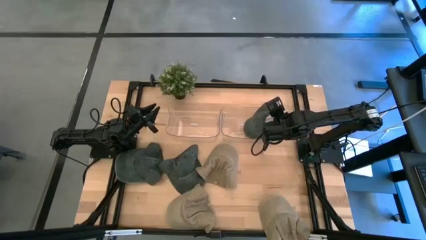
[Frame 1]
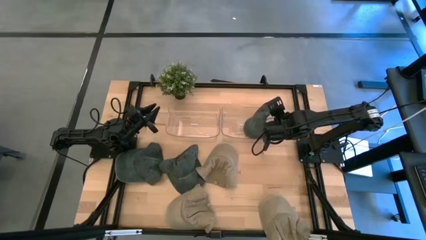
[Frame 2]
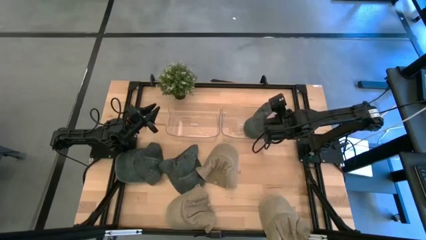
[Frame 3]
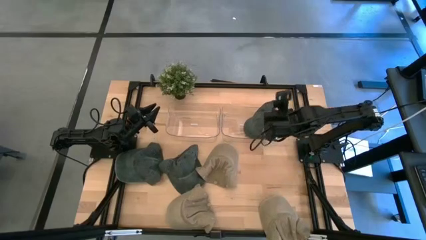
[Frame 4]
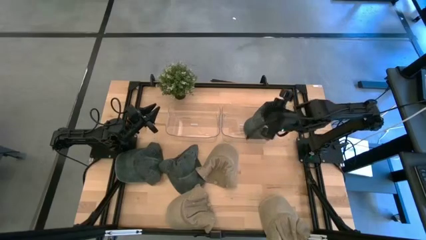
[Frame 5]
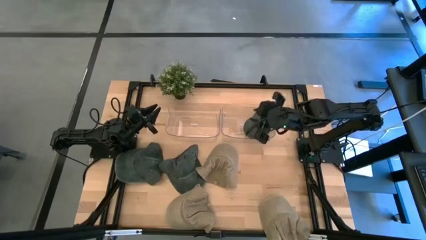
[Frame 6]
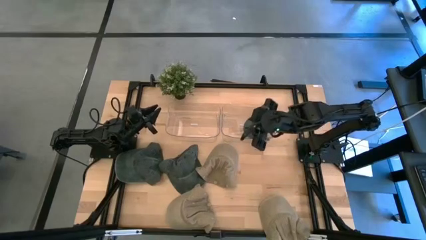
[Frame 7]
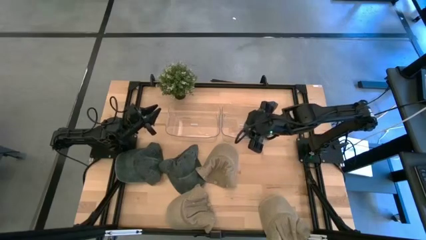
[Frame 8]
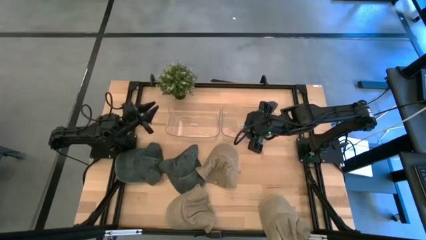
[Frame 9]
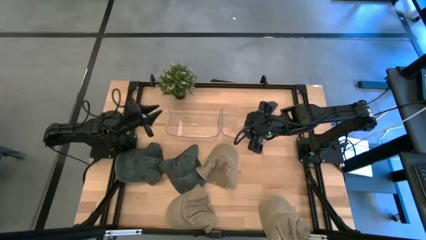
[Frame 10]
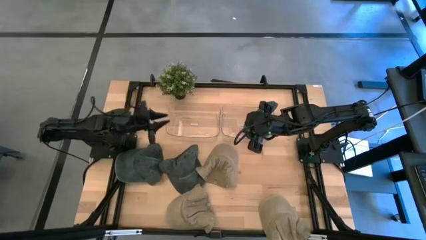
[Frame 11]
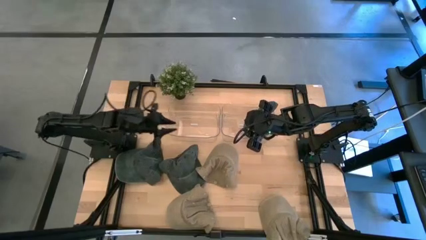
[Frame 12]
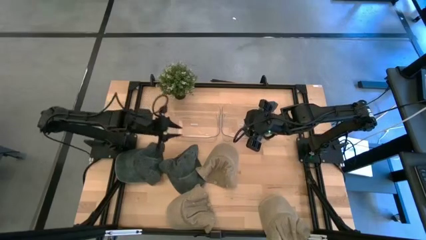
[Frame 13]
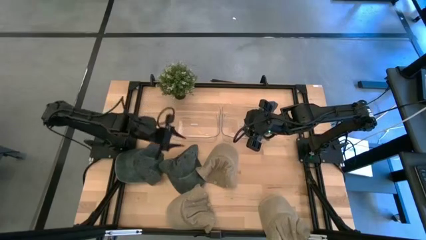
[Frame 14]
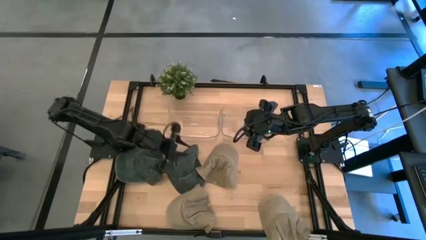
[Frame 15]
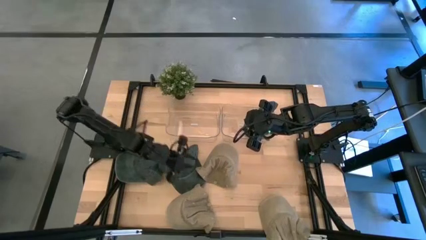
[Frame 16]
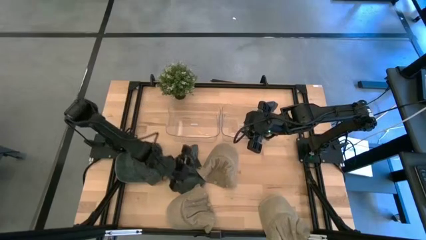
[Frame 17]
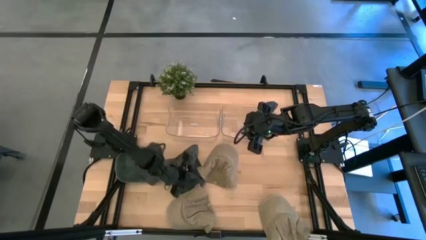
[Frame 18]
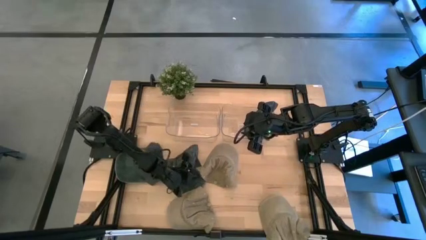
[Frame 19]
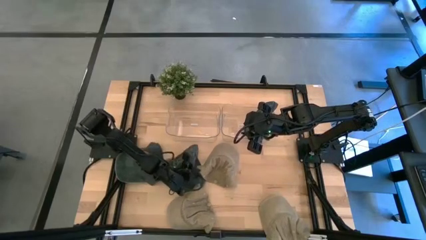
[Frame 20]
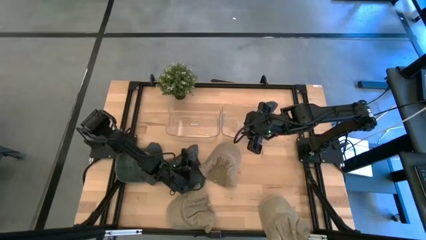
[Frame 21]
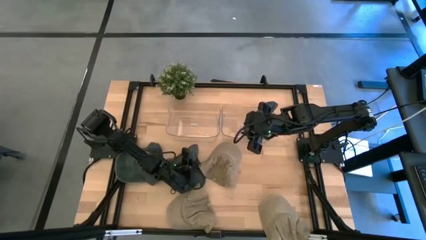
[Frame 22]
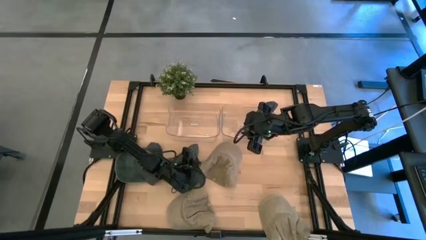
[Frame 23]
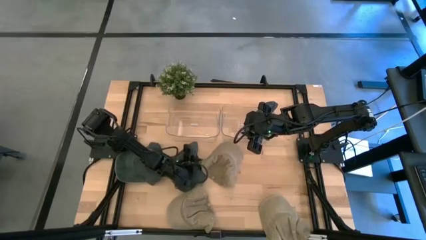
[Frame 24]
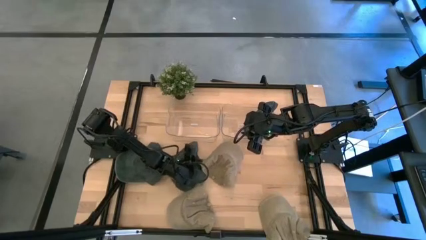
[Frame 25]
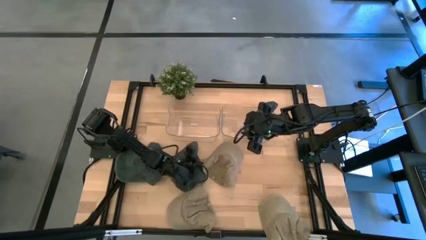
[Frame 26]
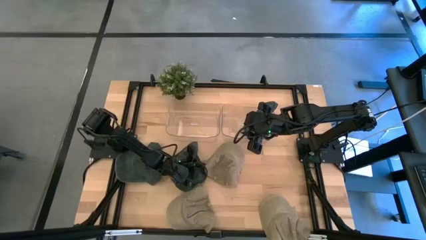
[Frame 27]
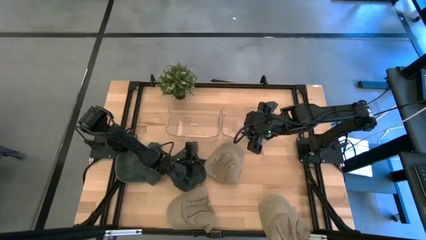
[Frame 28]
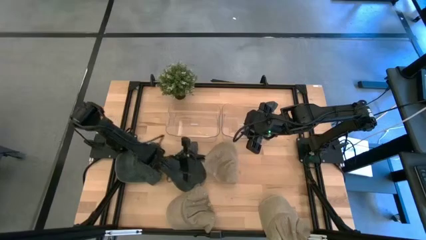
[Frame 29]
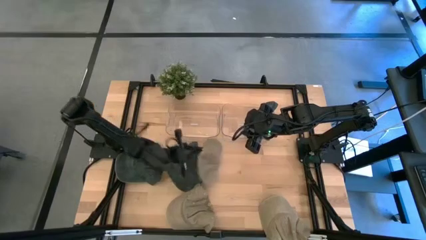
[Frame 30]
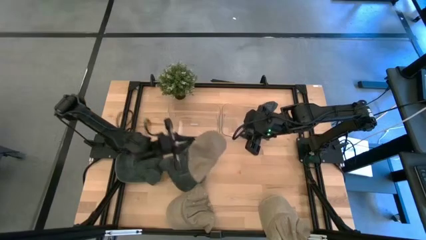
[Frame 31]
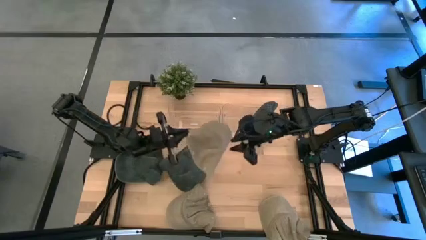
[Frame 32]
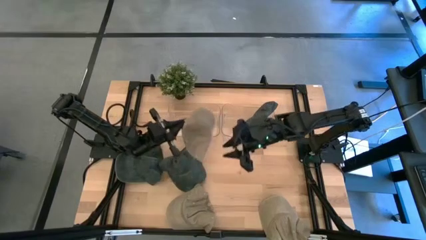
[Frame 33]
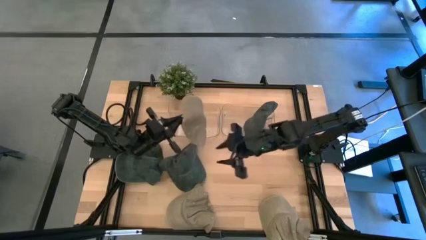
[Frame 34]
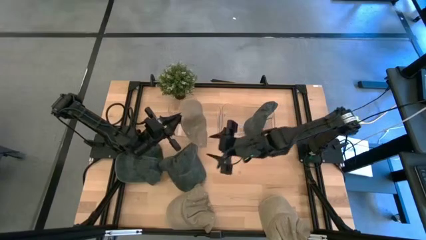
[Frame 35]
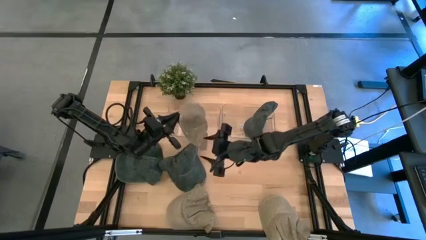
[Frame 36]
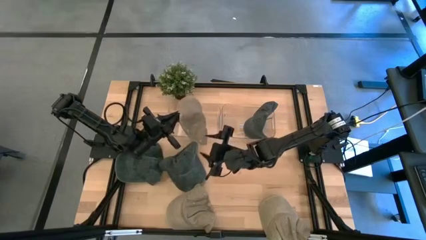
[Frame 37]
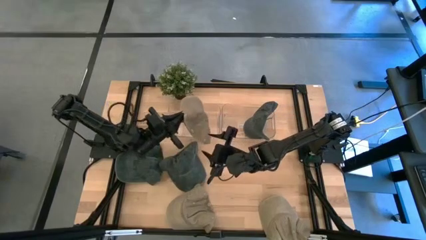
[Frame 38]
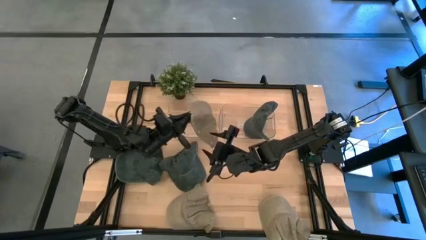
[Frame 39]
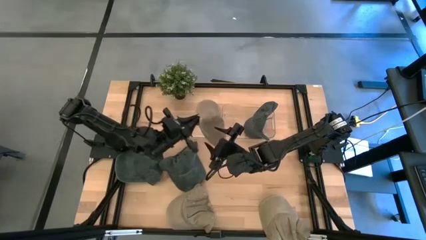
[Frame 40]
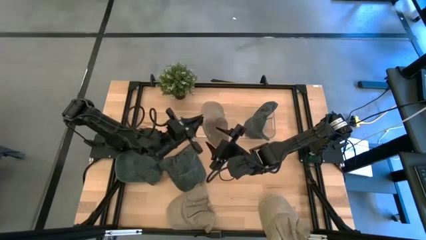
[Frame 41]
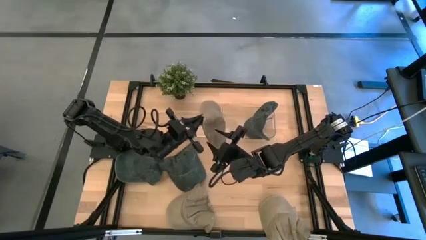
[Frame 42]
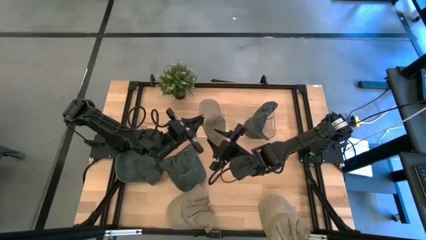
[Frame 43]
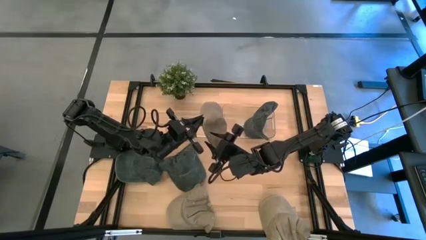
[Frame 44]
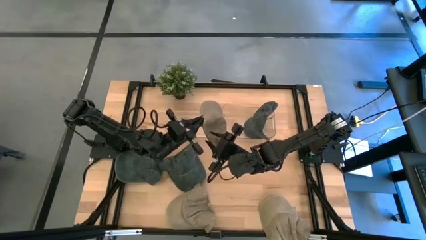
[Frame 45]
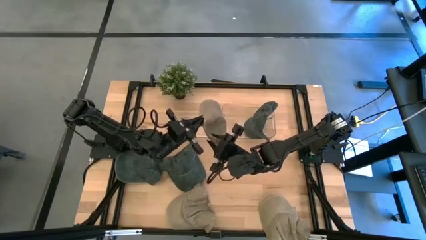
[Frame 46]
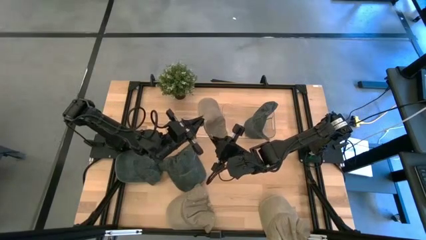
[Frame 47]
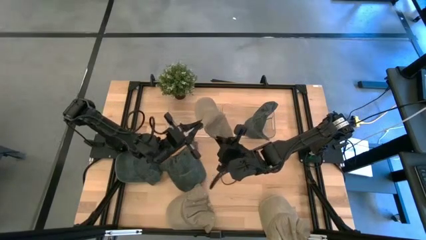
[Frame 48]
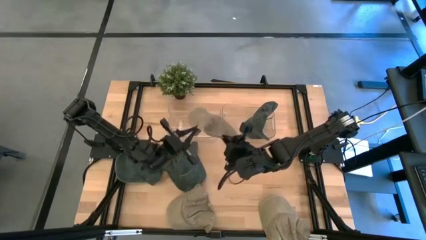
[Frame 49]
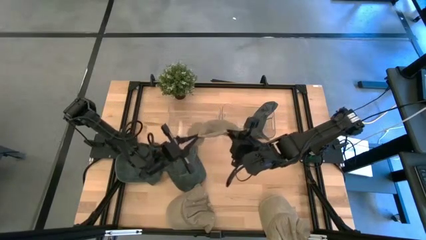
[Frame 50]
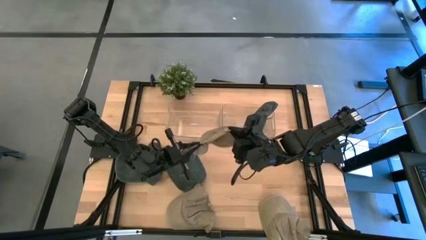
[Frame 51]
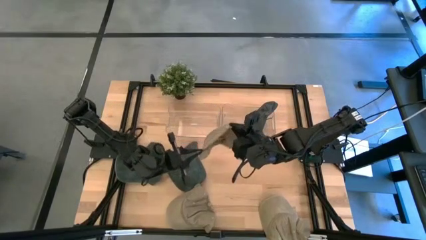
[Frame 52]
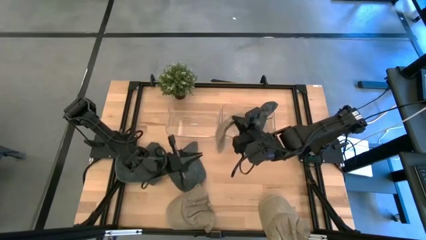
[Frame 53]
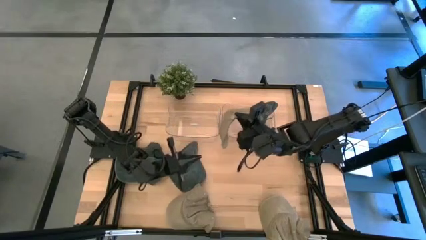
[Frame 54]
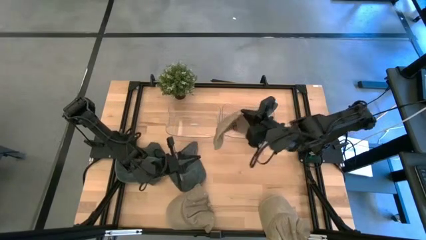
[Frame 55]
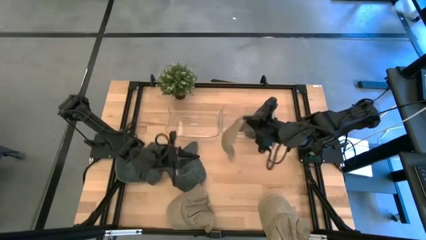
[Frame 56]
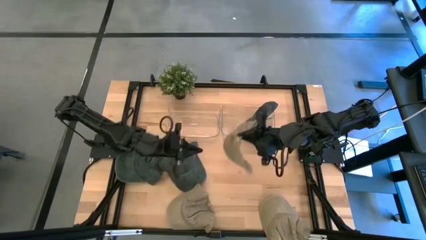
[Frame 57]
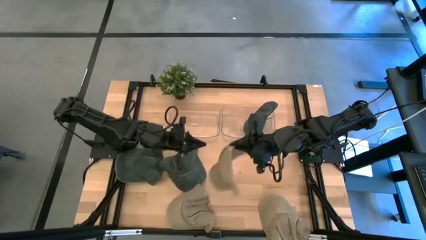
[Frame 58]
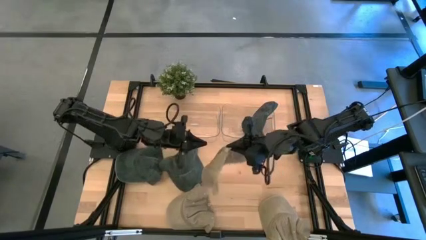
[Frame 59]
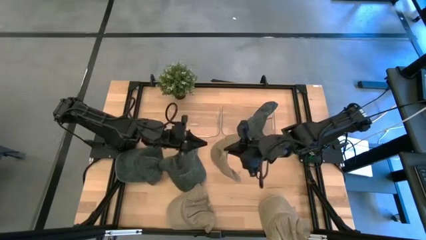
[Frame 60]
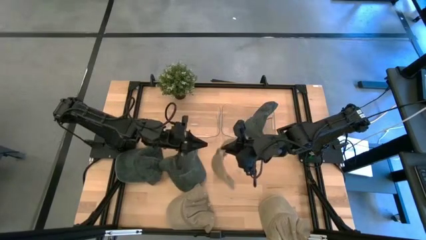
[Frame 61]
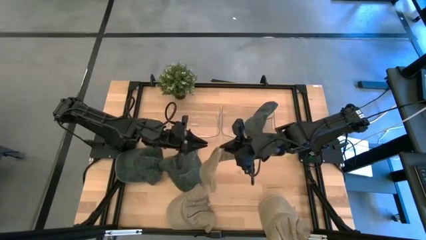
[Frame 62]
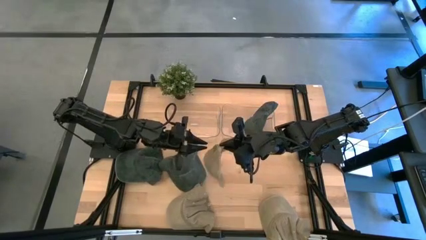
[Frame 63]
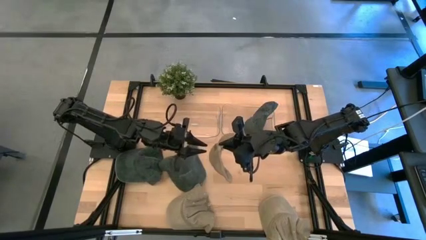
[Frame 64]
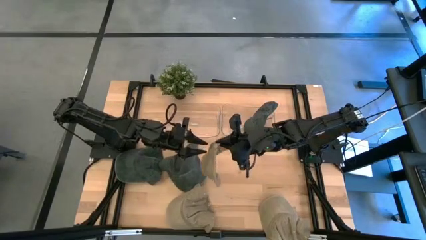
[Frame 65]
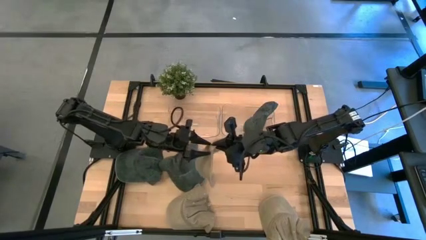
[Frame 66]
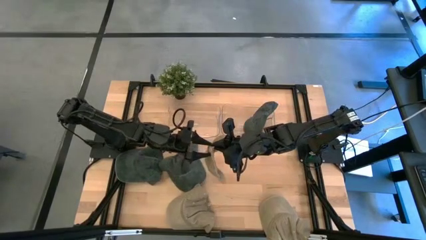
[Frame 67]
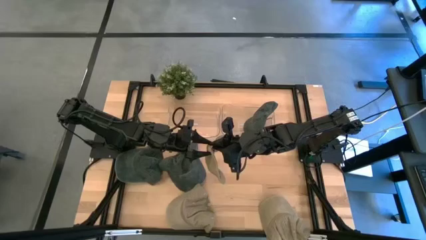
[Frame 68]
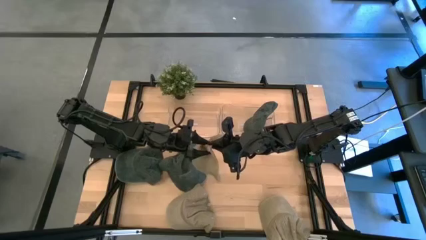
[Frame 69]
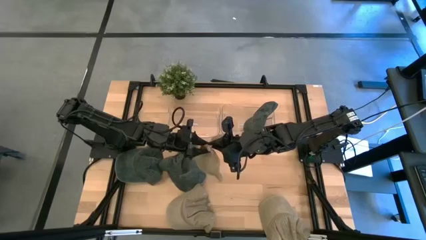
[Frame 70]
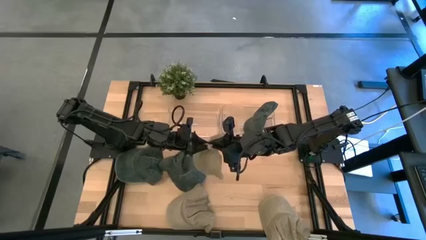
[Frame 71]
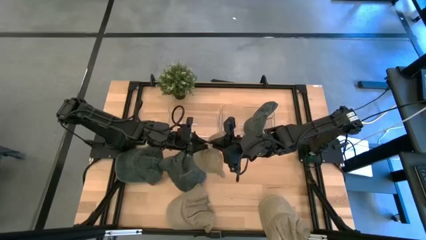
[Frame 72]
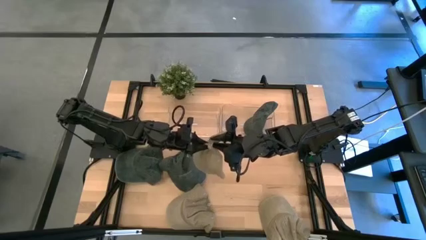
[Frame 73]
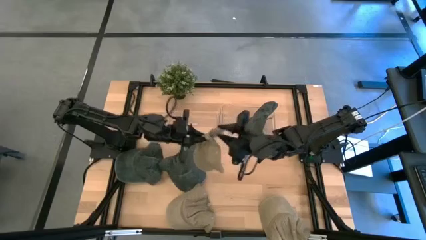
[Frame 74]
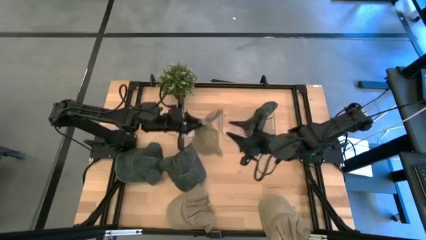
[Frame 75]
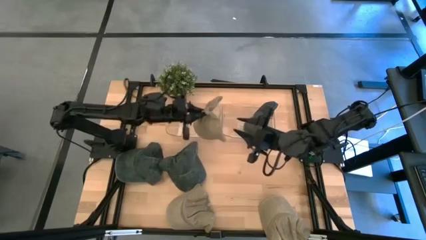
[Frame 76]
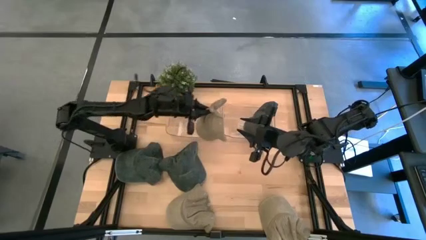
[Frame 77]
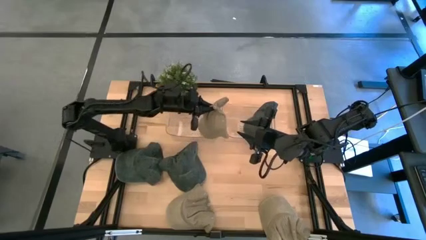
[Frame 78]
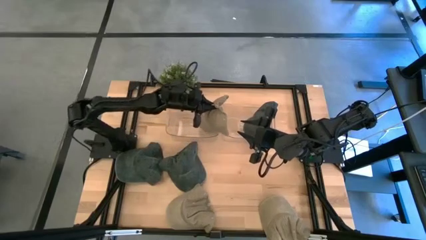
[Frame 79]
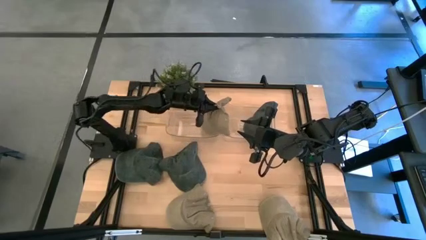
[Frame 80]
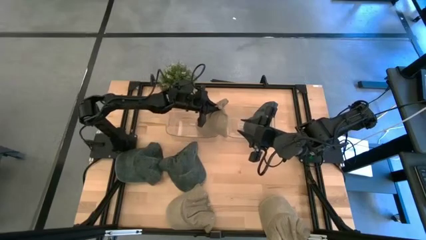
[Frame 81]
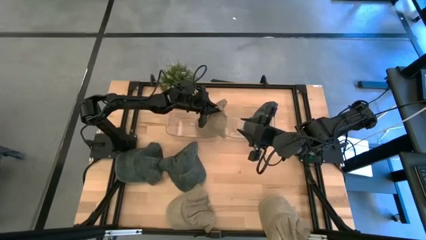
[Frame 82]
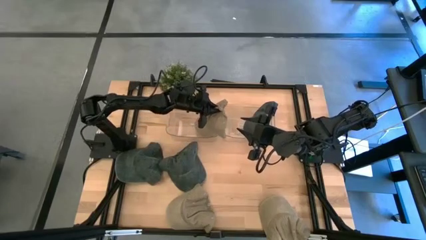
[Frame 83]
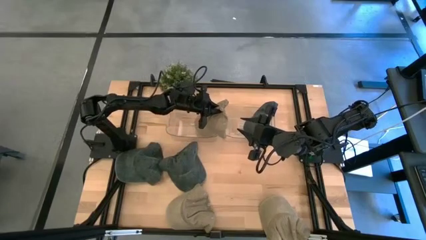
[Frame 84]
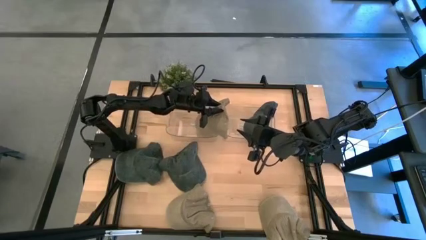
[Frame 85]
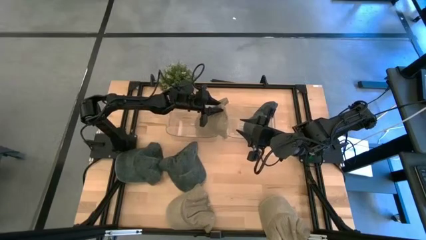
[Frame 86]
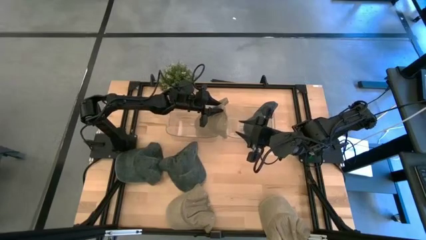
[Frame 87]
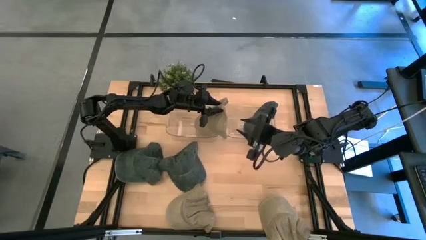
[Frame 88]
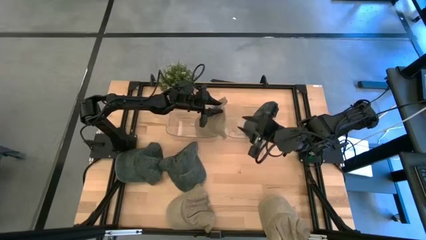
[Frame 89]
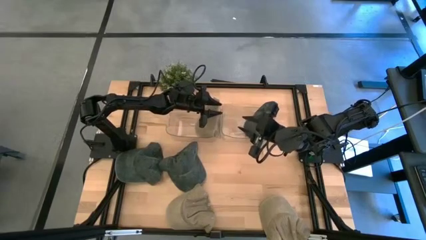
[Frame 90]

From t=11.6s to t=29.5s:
Task: Pick & Place hat
Put the top brown cap into the left transparent bin
